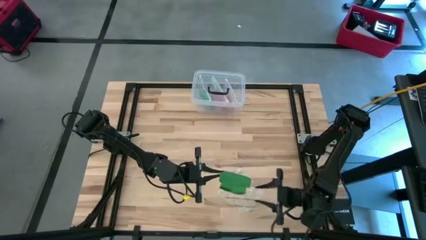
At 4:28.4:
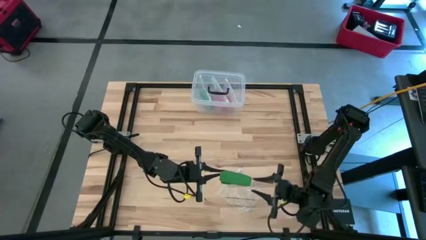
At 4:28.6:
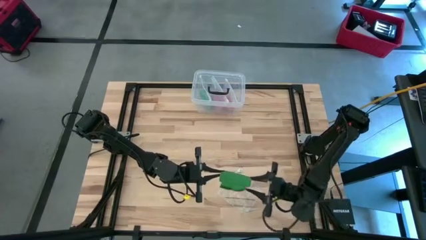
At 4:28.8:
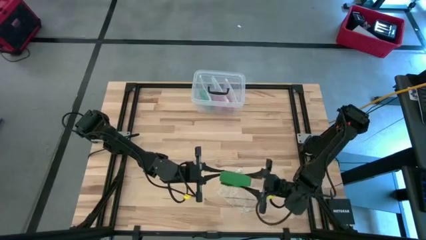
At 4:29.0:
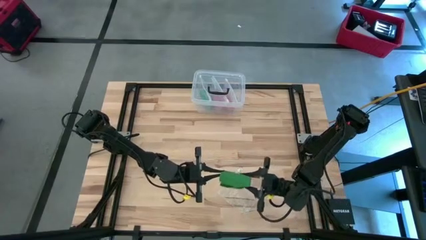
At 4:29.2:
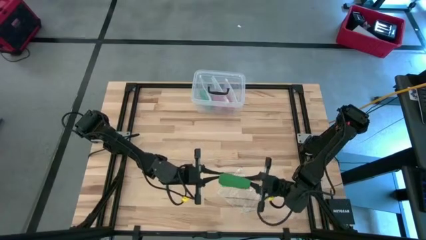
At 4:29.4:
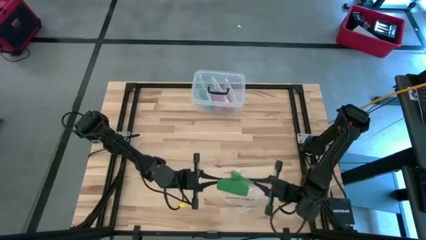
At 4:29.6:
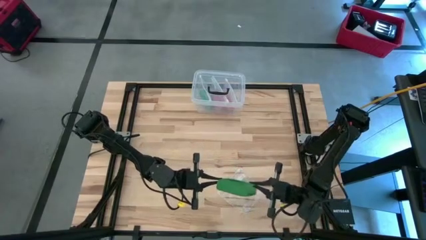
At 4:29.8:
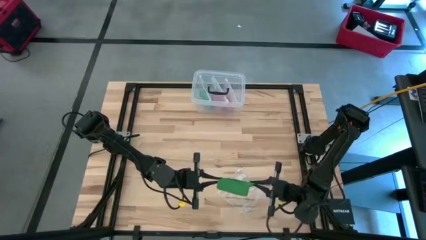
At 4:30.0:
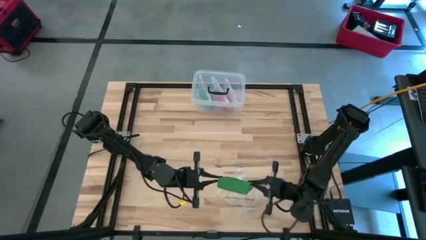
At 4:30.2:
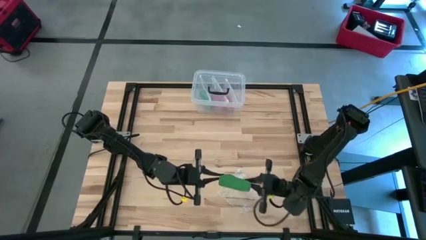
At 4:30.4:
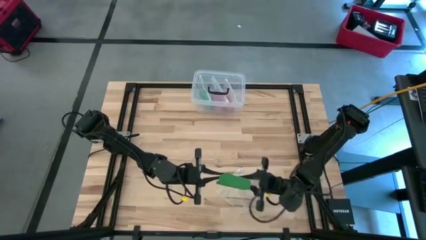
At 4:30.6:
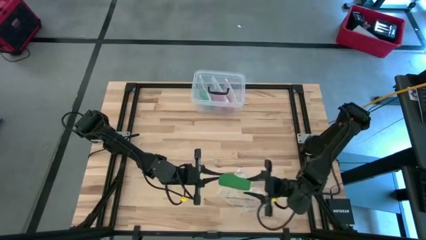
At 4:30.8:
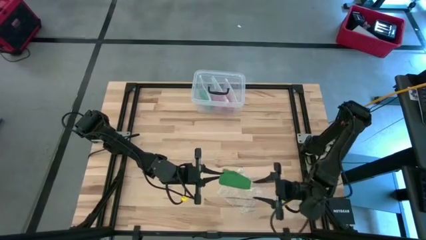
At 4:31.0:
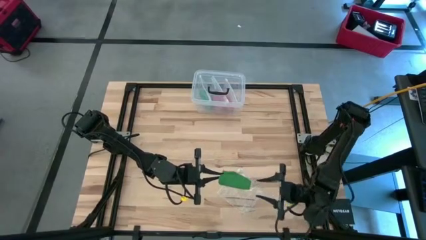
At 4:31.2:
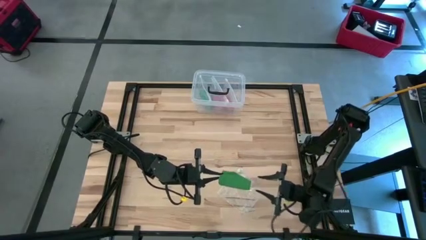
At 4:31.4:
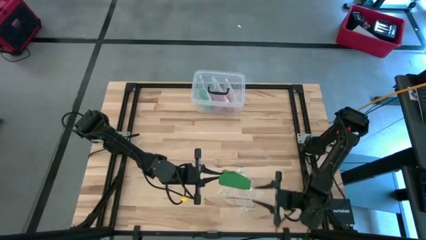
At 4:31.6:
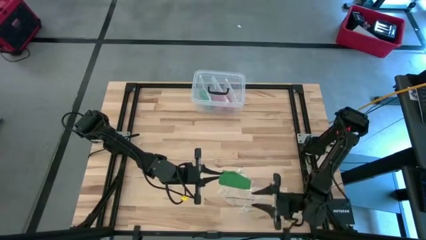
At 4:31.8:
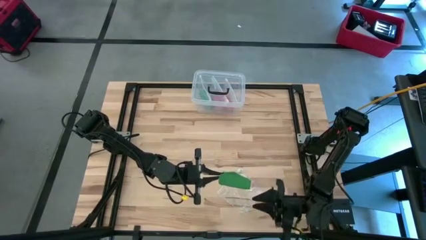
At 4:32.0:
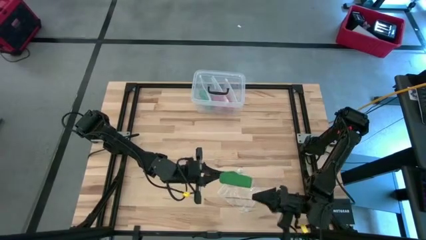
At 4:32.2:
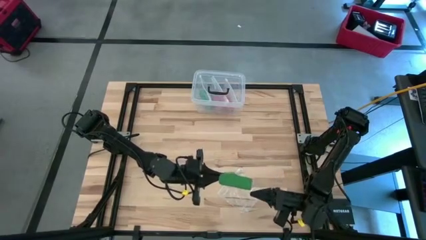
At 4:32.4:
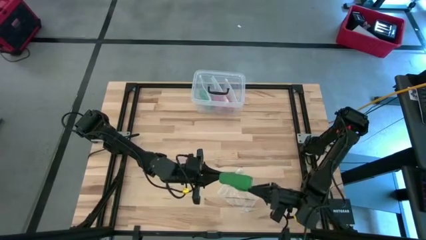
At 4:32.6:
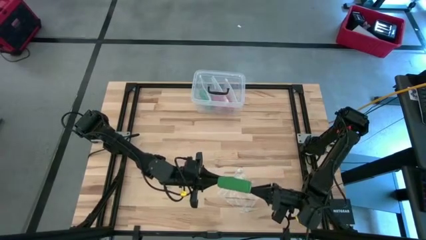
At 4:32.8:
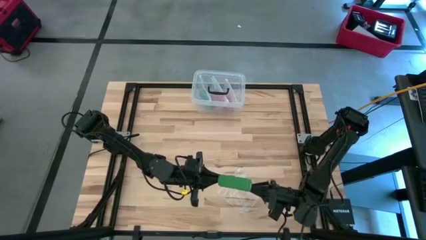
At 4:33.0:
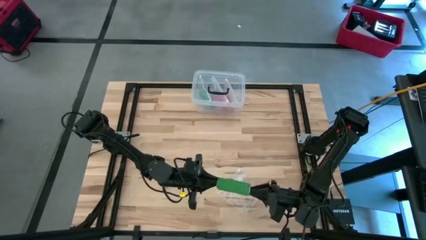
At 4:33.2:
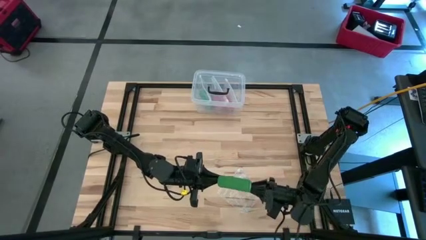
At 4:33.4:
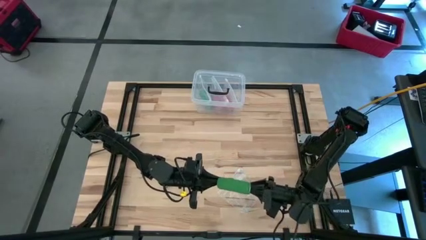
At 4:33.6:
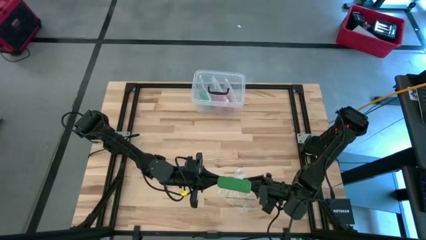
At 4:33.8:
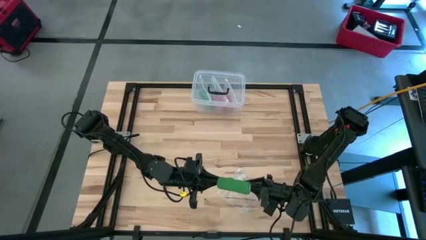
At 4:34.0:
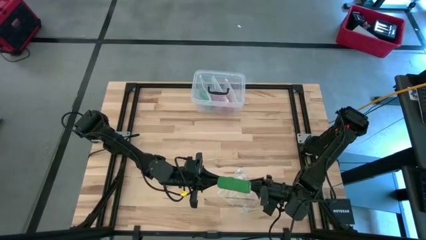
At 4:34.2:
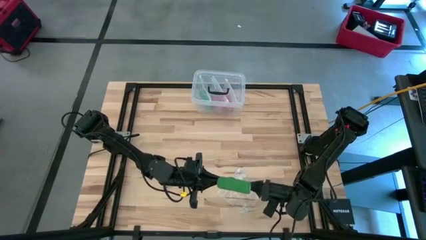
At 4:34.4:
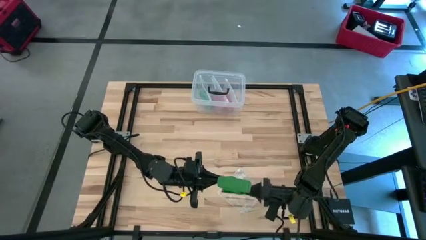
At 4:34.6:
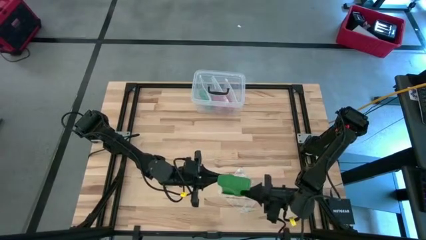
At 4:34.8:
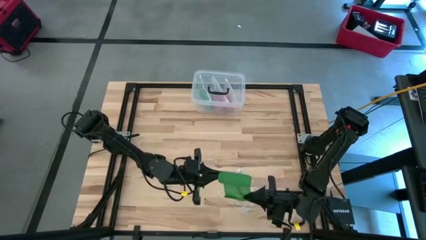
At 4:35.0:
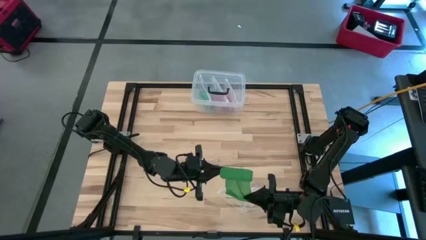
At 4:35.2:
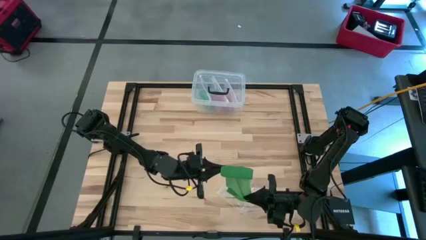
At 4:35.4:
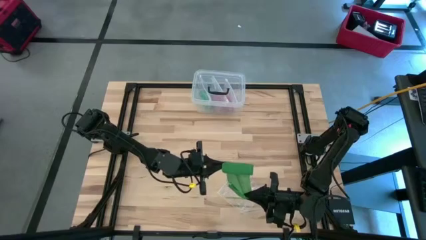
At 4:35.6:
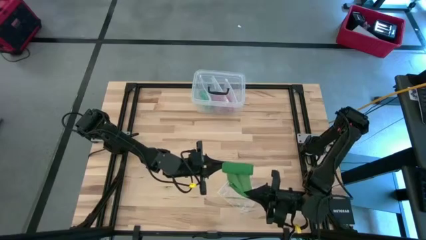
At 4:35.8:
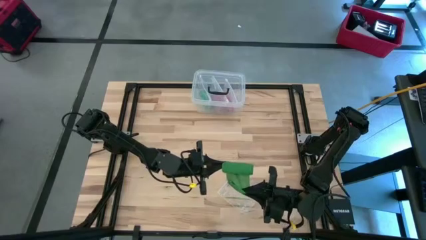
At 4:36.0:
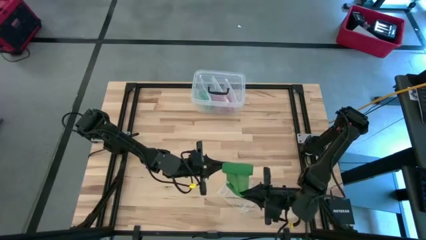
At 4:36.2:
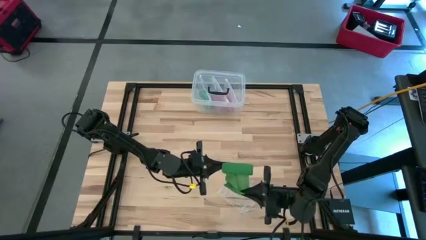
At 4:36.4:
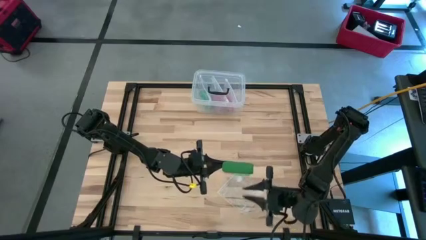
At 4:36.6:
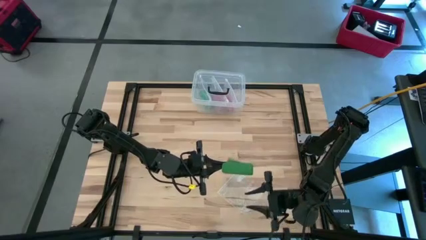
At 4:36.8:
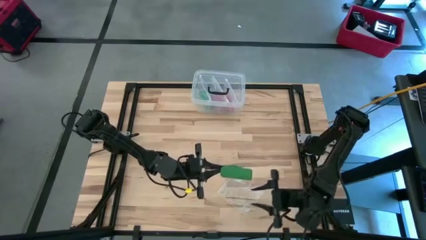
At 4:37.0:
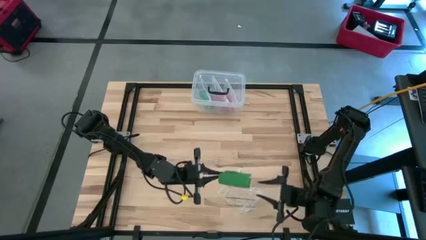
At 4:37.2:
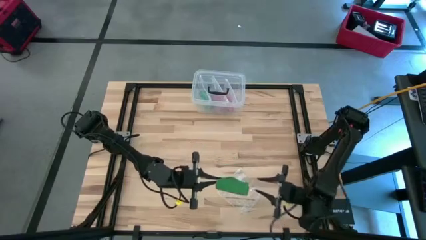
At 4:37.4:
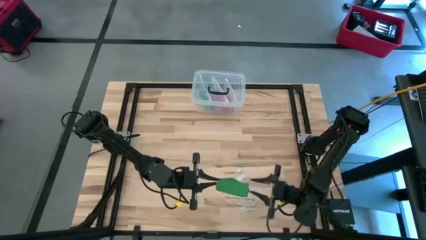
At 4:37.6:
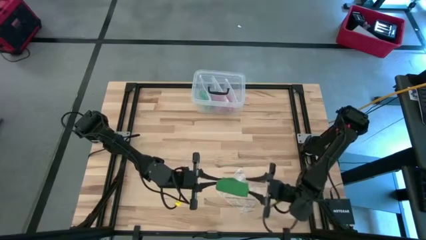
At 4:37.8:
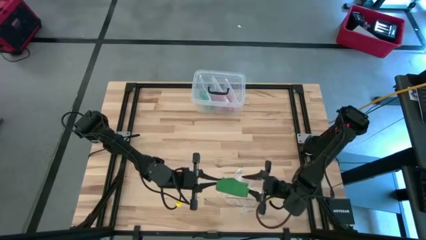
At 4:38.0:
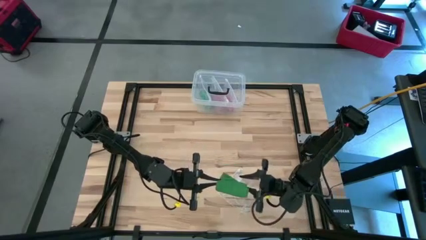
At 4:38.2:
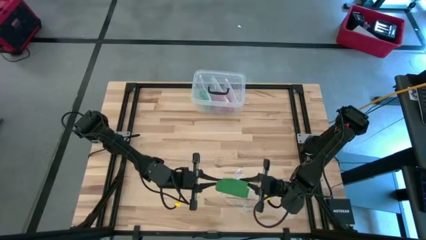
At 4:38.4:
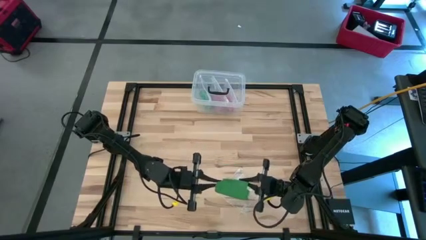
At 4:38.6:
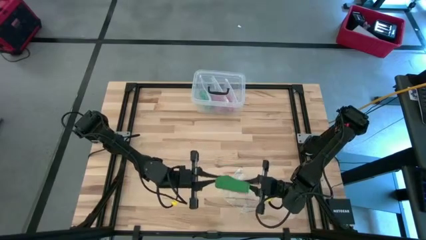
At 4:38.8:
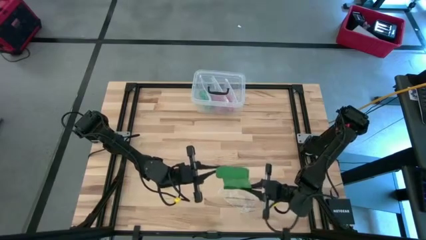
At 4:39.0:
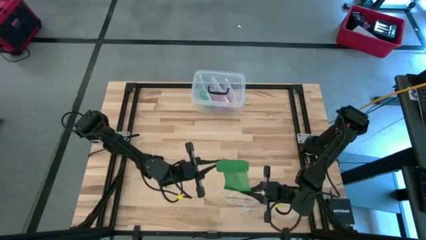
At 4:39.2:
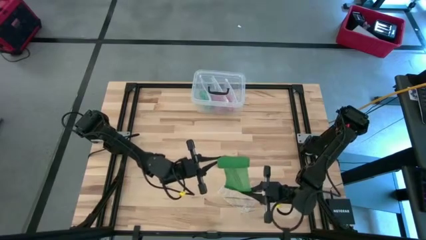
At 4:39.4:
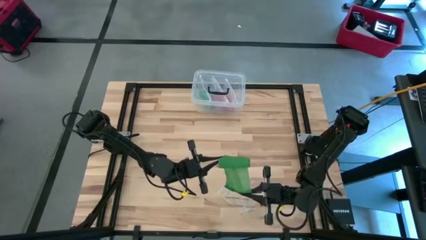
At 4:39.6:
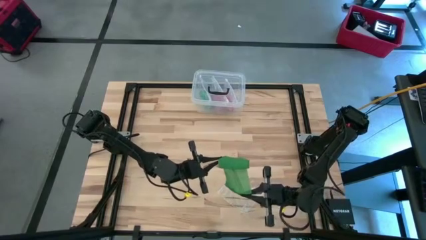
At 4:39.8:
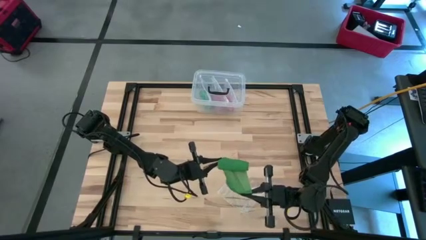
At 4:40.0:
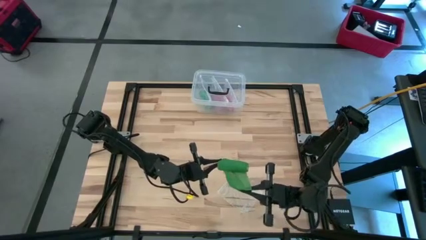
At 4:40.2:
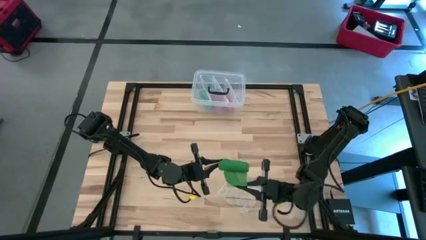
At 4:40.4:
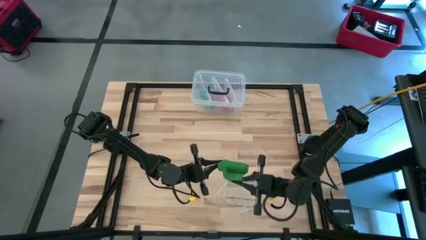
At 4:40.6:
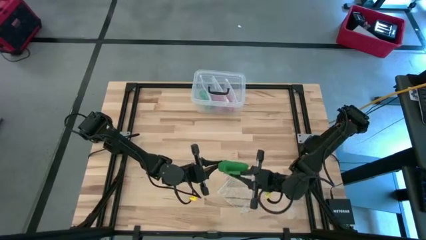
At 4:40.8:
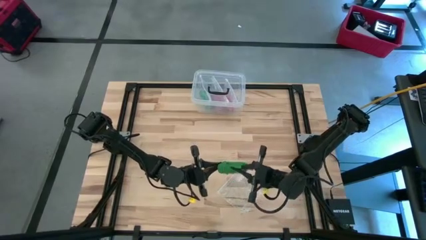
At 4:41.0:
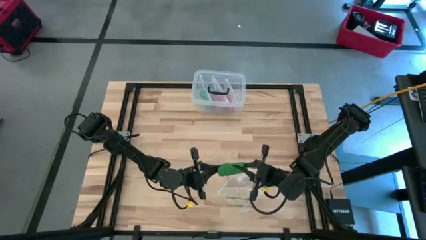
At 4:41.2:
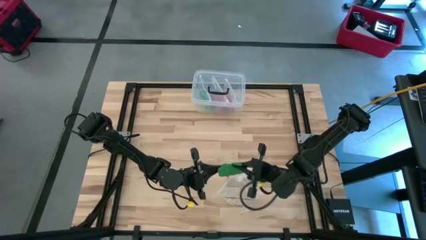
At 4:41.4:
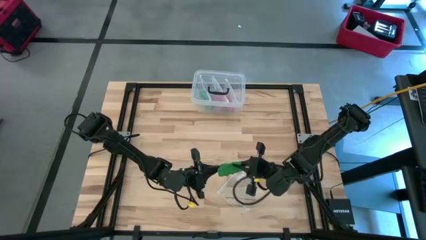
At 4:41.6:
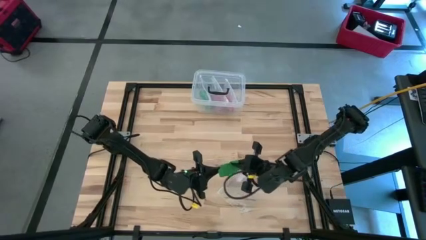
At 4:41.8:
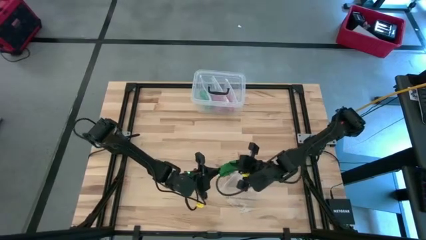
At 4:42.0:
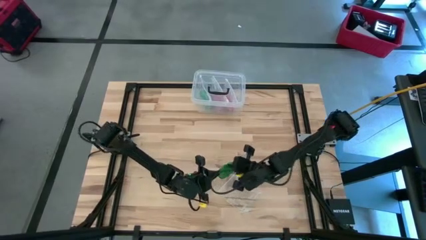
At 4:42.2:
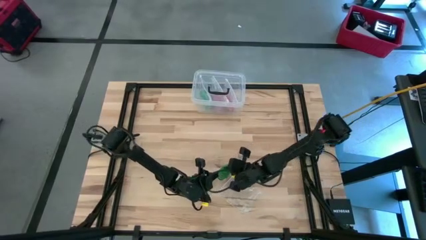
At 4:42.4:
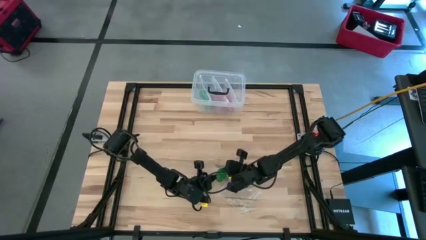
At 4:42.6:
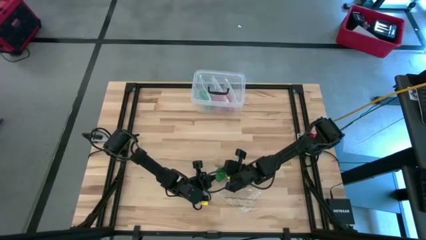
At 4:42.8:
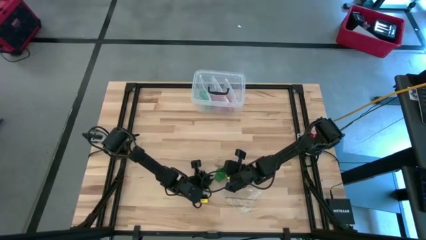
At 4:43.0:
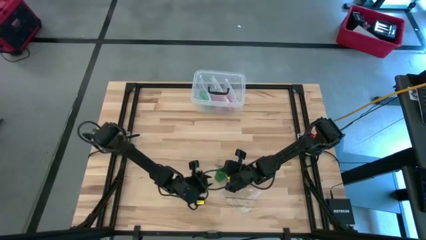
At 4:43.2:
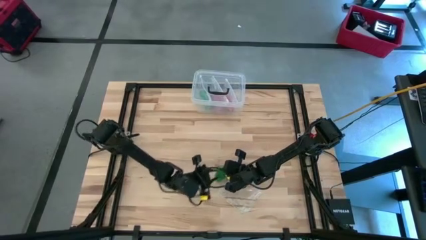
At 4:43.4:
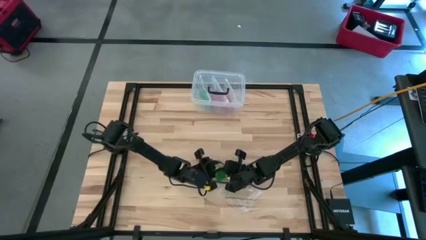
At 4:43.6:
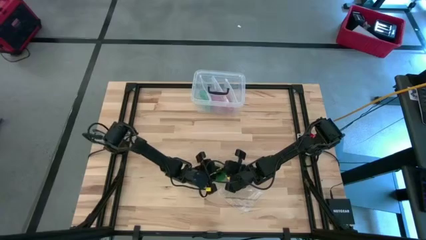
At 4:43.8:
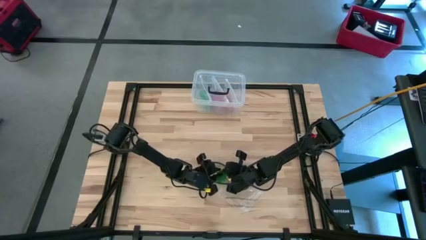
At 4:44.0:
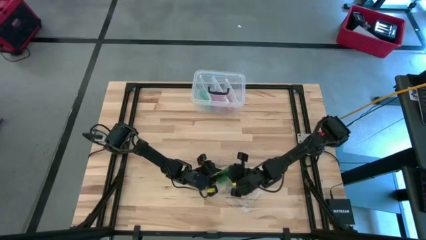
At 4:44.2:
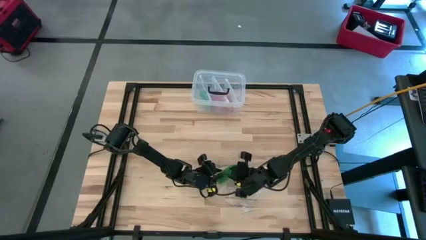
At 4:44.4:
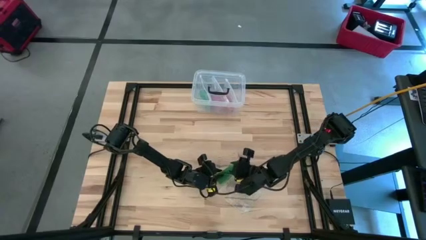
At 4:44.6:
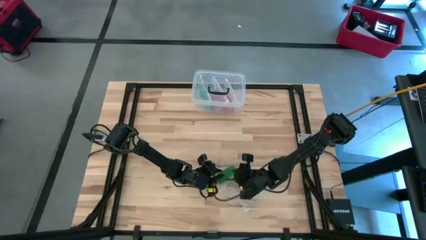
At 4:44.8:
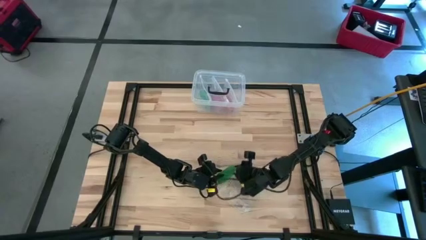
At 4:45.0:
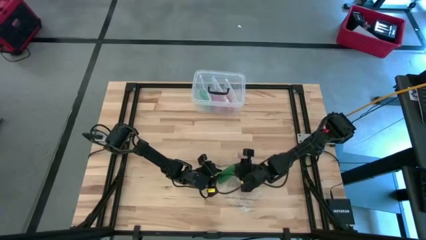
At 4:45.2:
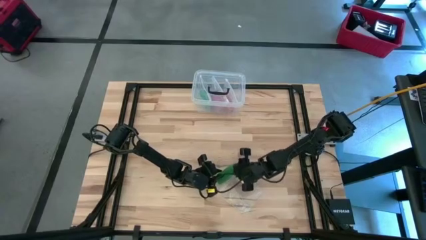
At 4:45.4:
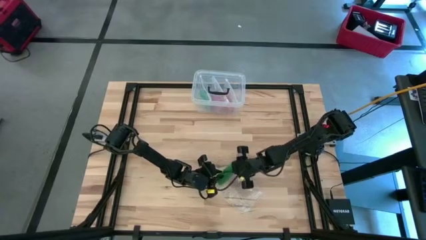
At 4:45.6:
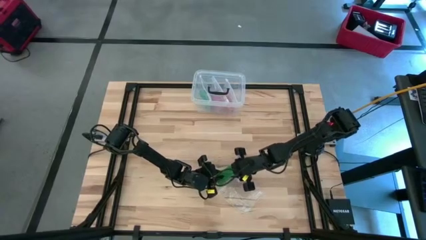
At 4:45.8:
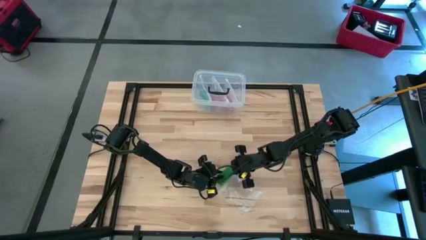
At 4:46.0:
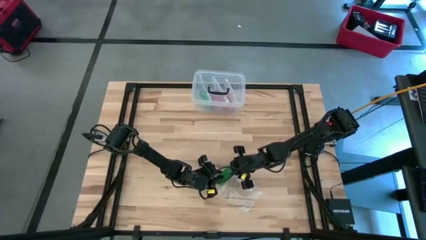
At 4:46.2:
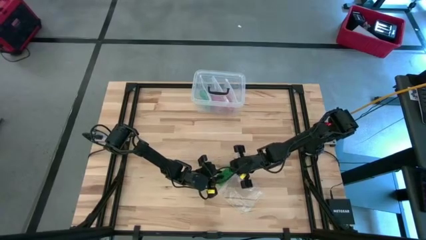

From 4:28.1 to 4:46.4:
Task: Roll bandage
Roll the green bandage
